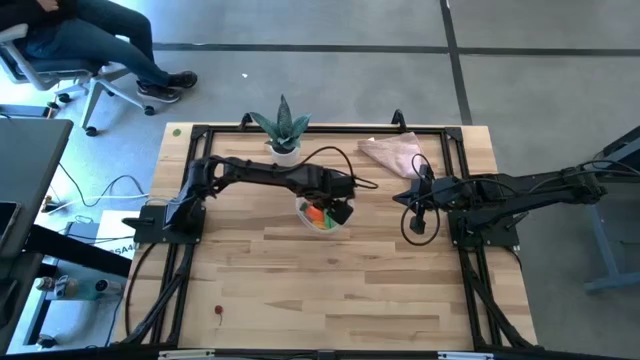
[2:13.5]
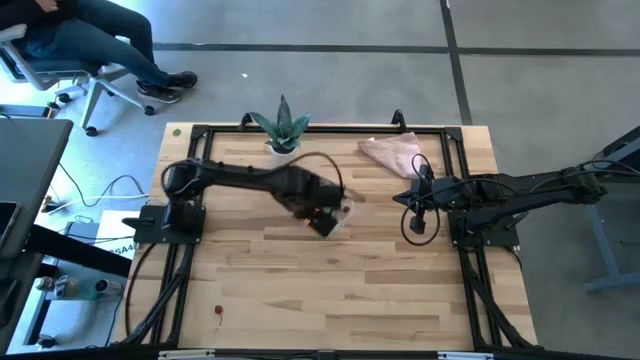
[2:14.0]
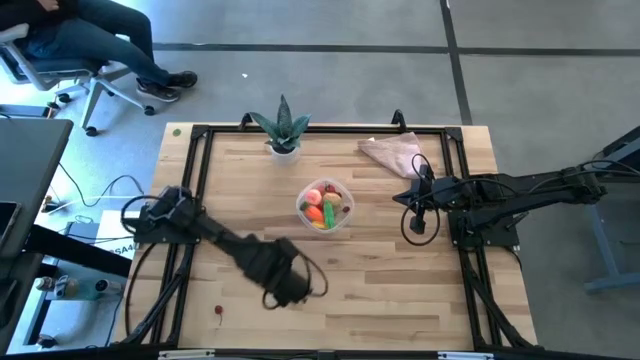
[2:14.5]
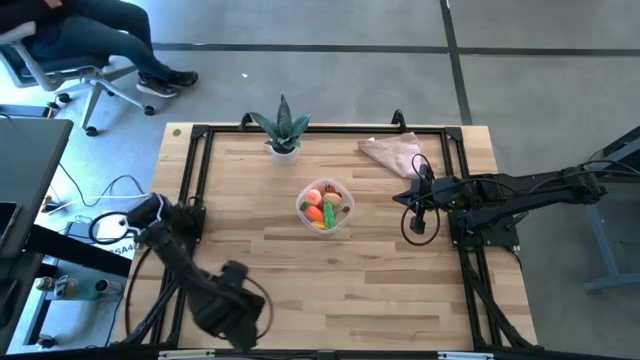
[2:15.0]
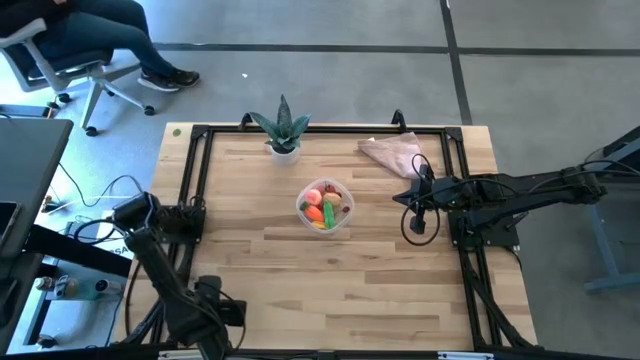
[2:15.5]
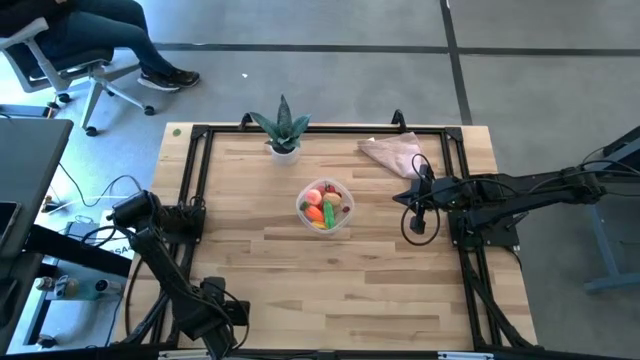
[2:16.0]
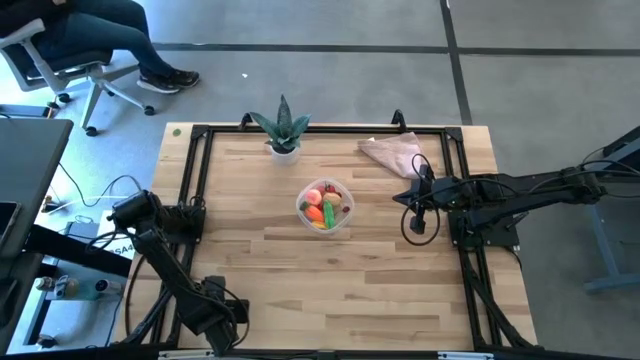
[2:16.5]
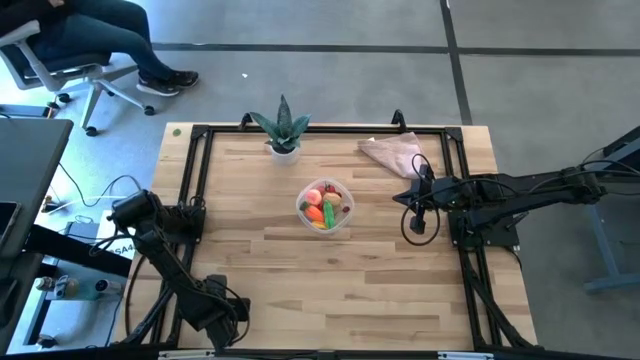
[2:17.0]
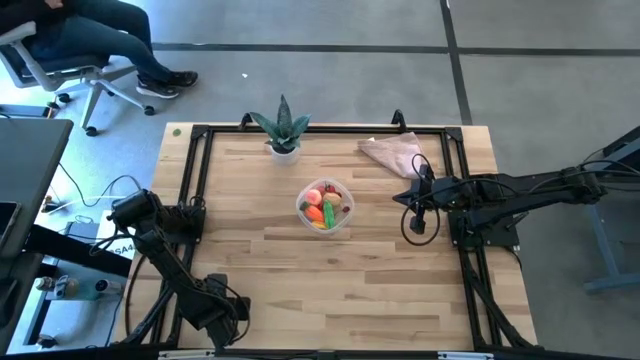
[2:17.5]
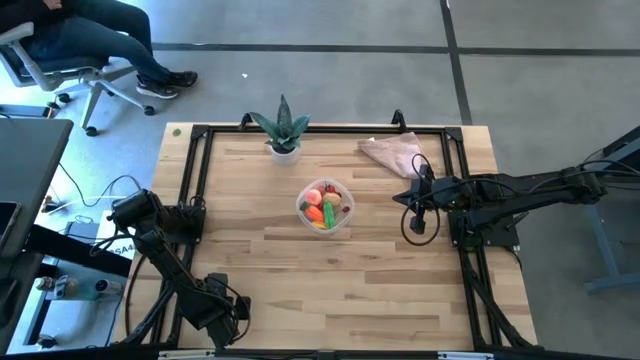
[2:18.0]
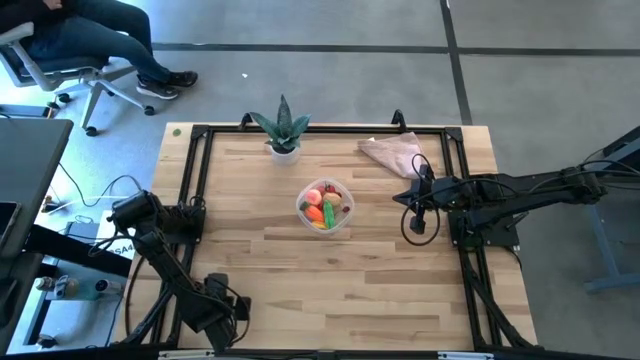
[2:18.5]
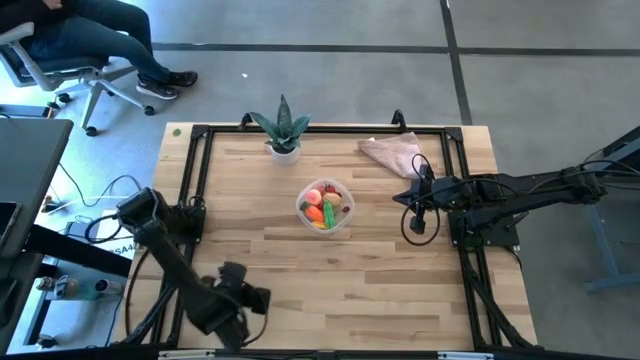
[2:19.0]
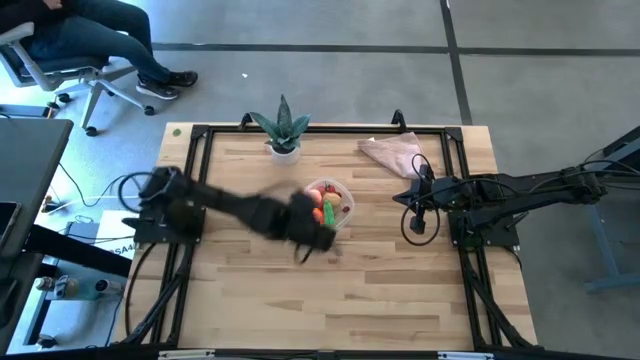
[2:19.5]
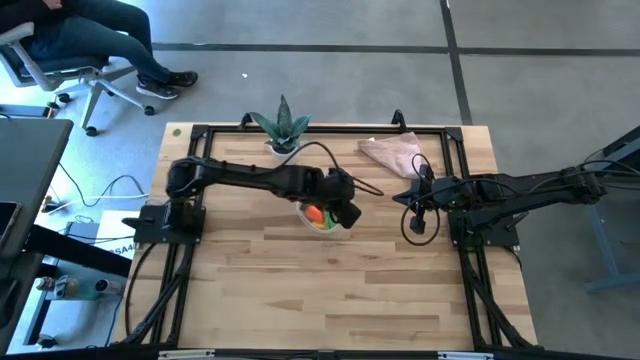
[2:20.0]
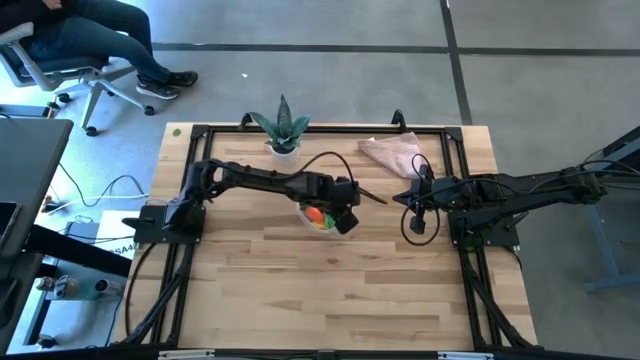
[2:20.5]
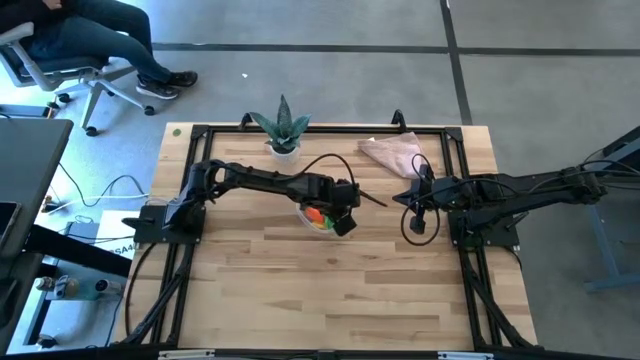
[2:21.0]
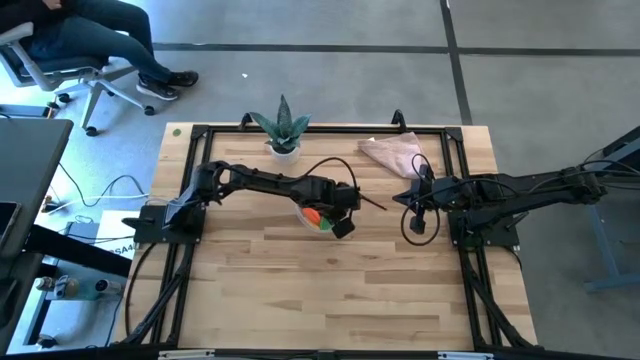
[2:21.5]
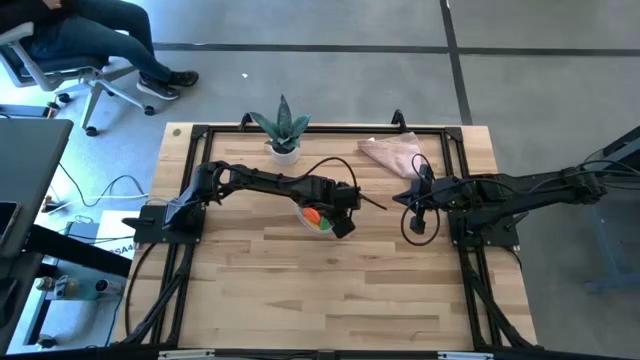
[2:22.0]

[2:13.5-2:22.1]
Task: Pick and placing Produce into tupperware
Put the red cherry into the transparent bin

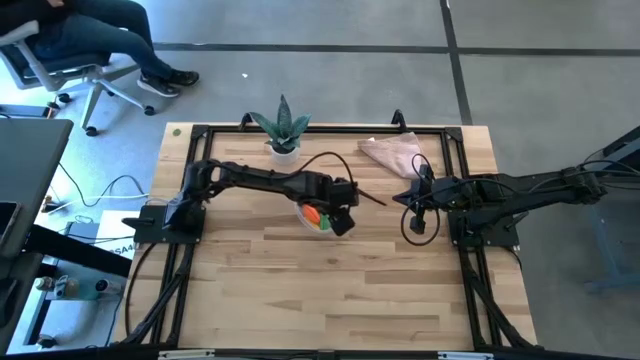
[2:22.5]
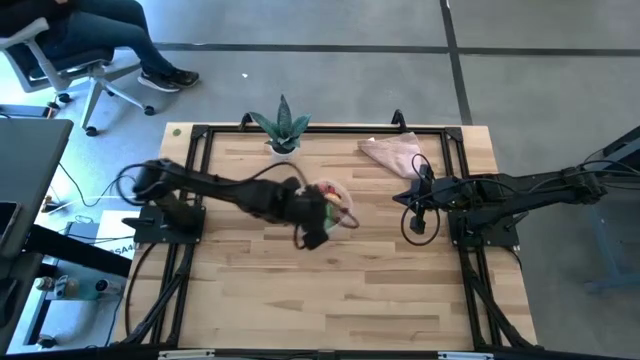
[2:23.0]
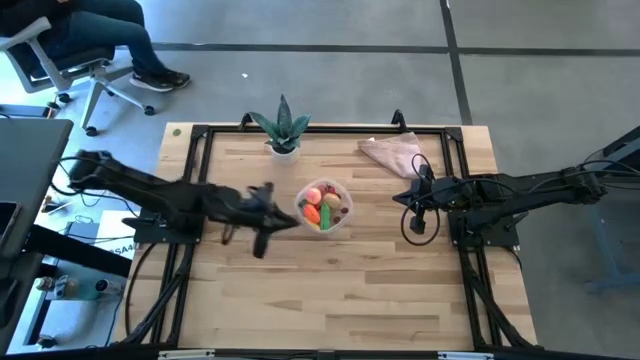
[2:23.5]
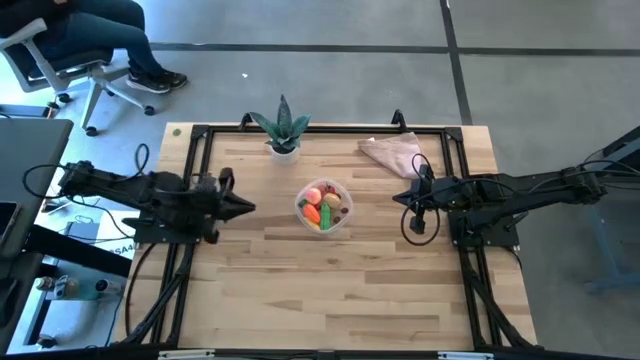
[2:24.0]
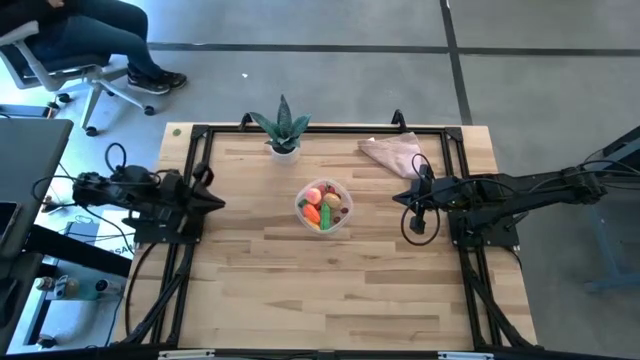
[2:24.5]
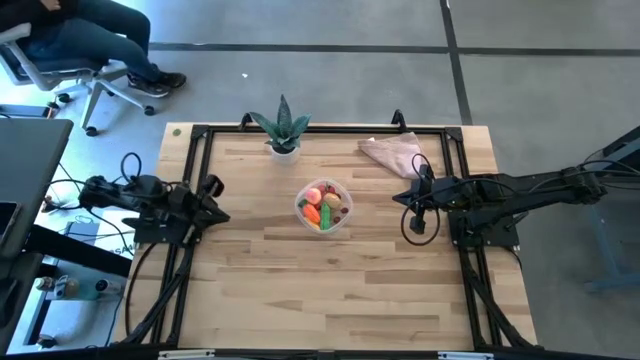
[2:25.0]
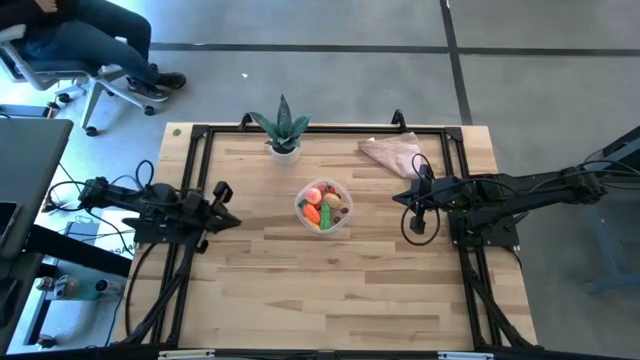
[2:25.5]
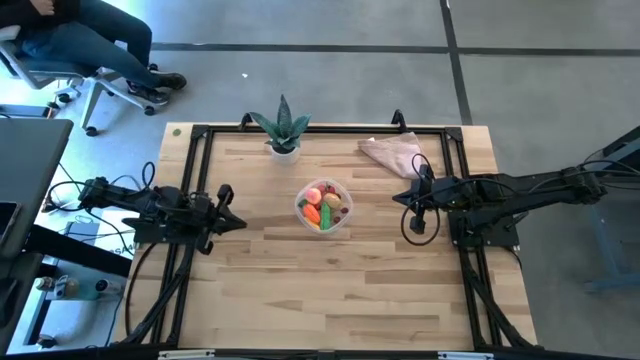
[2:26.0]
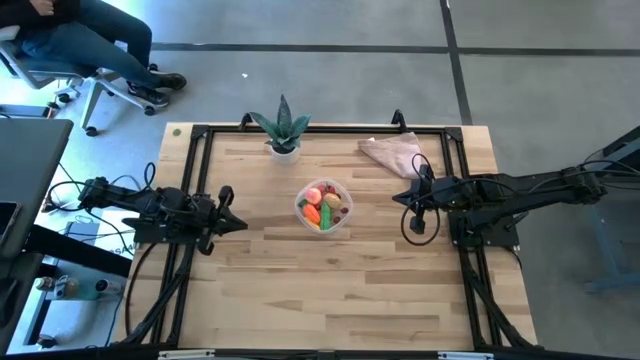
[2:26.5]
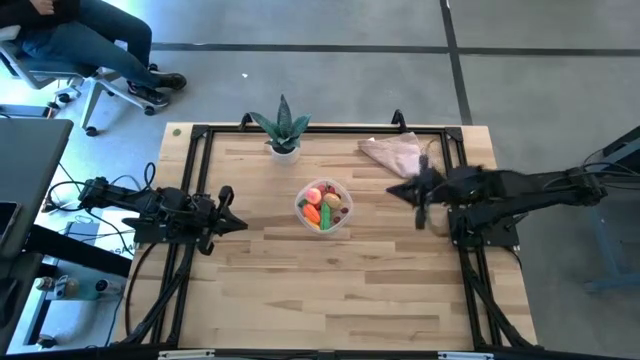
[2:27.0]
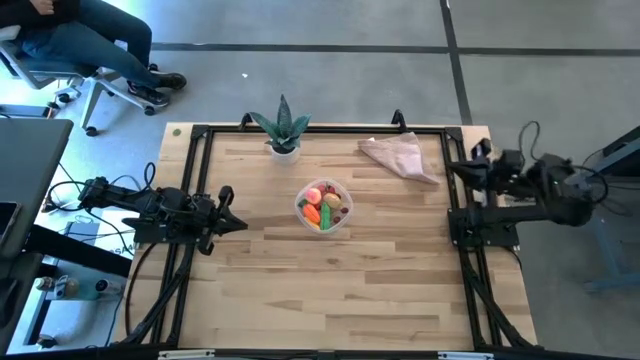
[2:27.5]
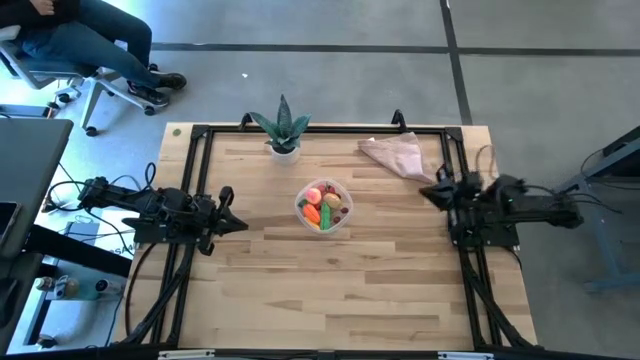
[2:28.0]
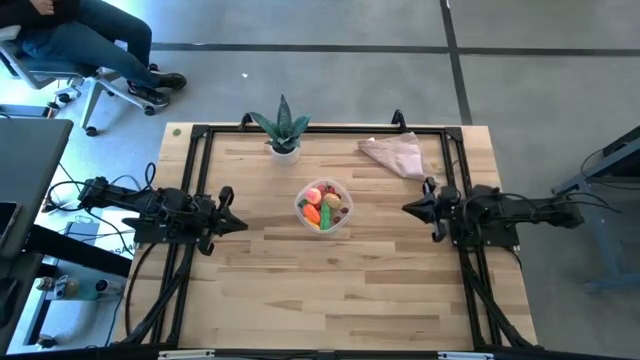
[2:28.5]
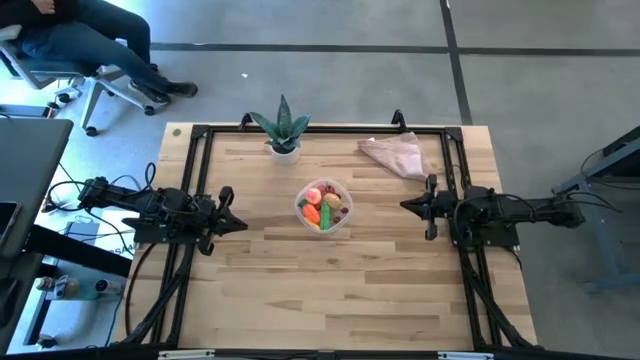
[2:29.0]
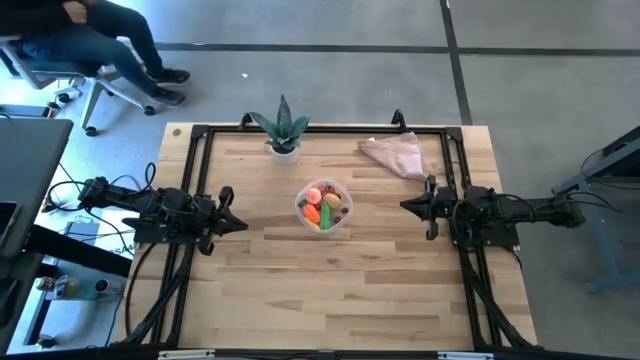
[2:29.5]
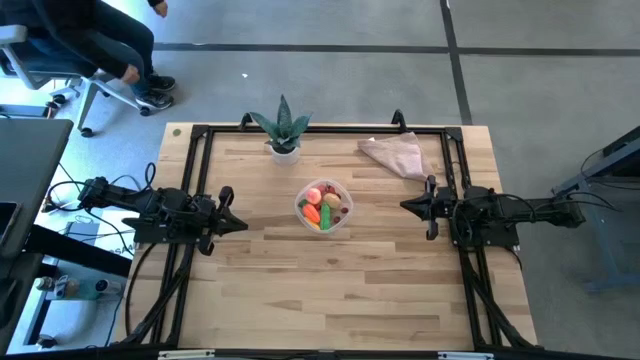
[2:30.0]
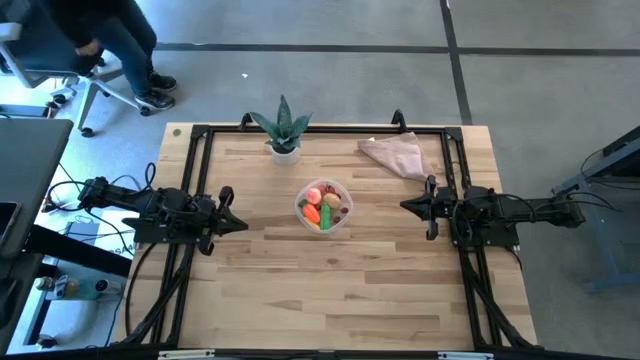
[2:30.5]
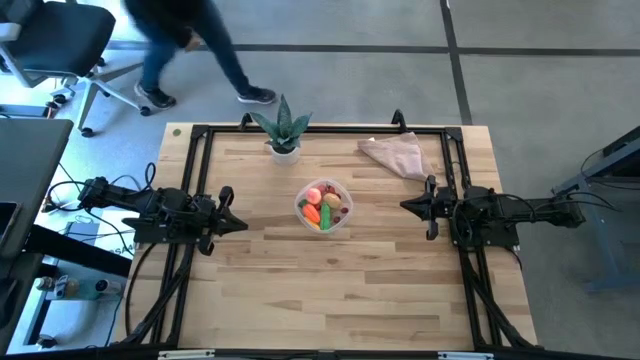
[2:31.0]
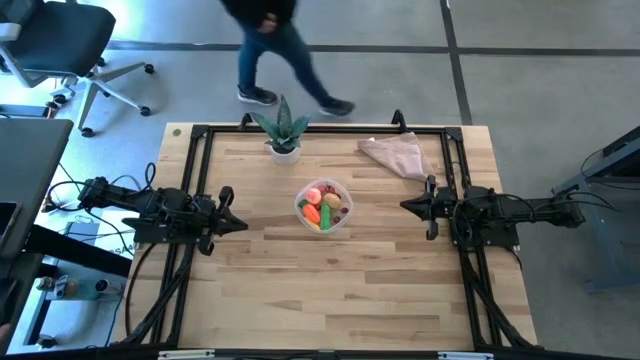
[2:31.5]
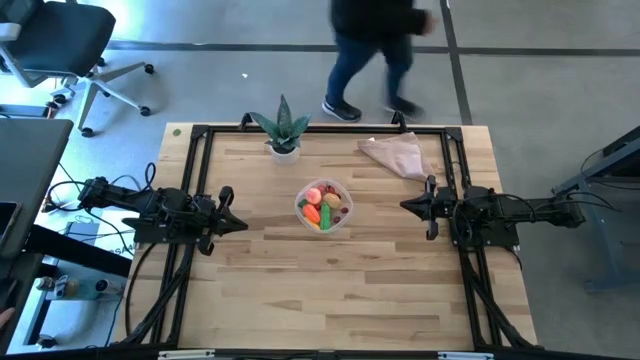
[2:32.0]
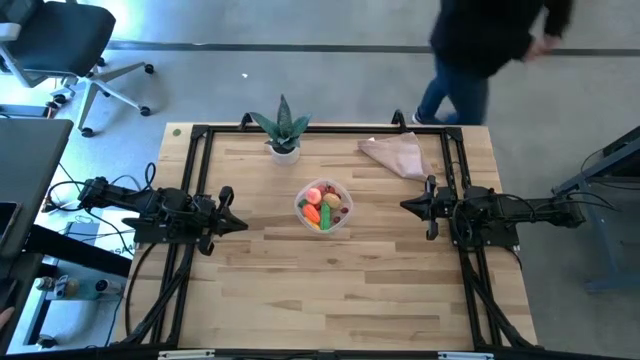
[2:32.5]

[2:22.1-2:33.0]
Return to Home Position

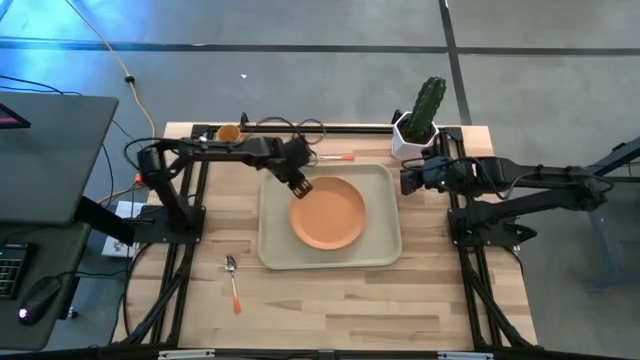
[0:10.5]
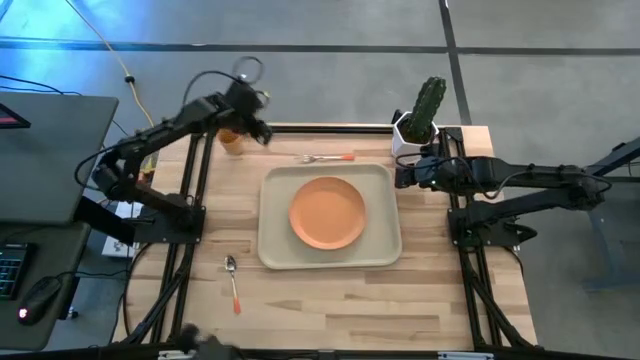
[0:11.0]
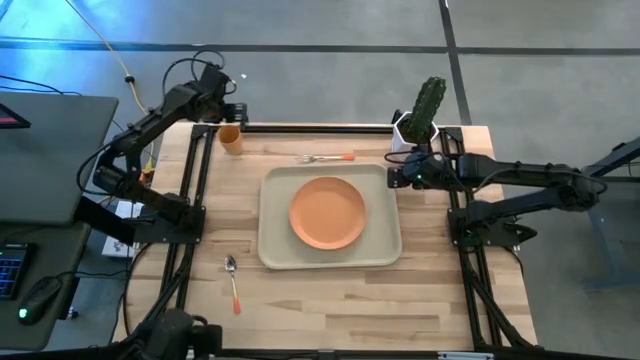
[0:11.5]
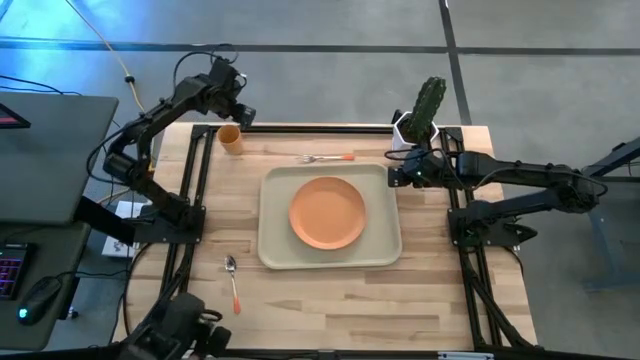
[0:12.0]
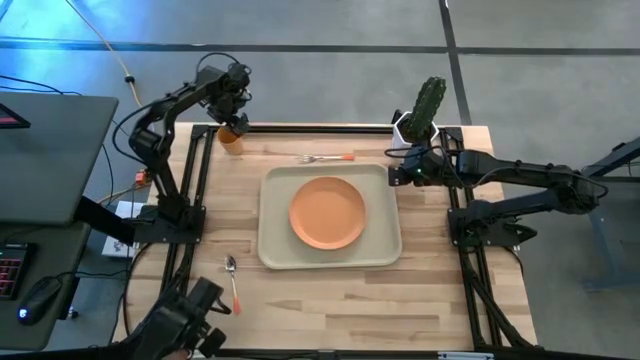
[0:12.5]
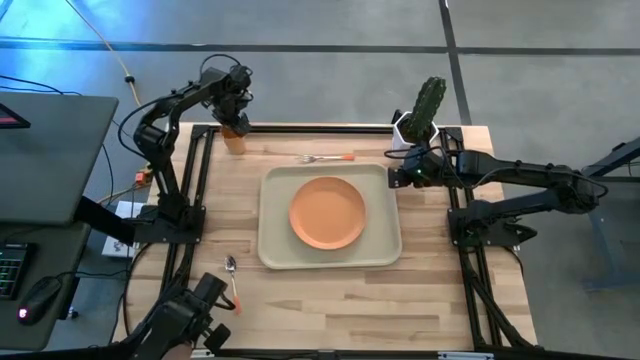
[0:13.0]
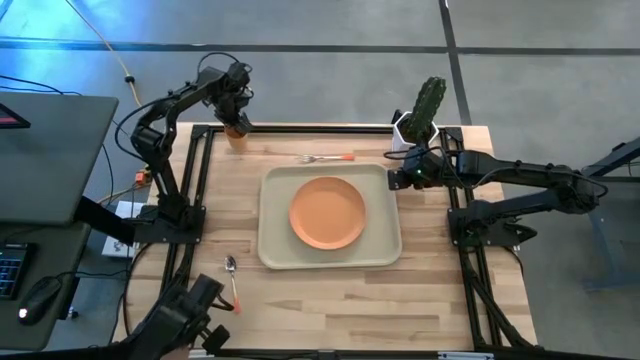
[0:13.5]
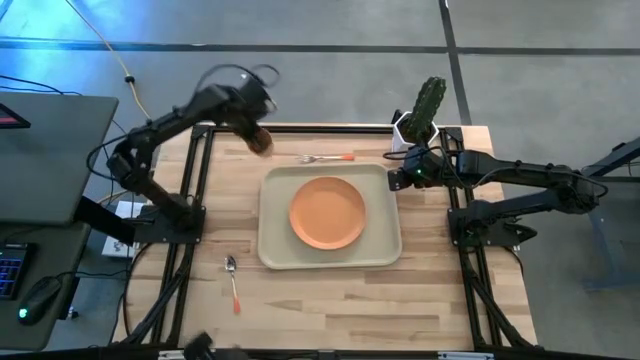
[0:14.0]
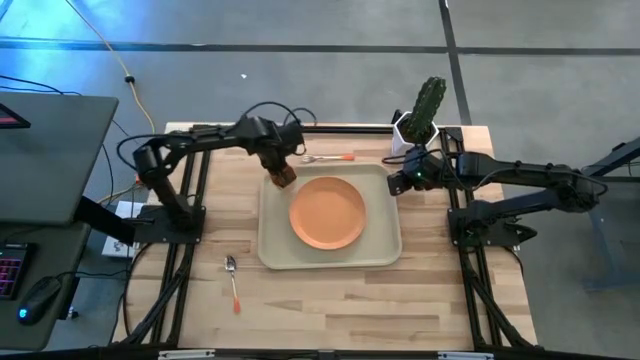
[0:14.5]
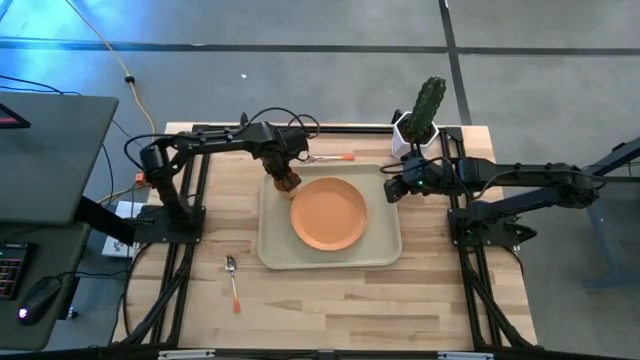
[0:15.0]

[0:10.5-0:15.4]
Task: Pick and place plate/cup/fork/spoon on tray
Put the orange cup on the off white tray on the top left of the orange plate
